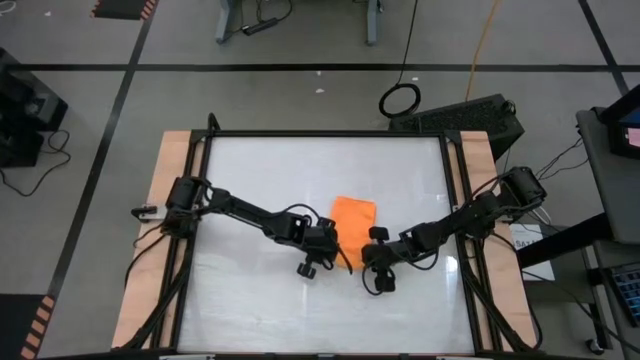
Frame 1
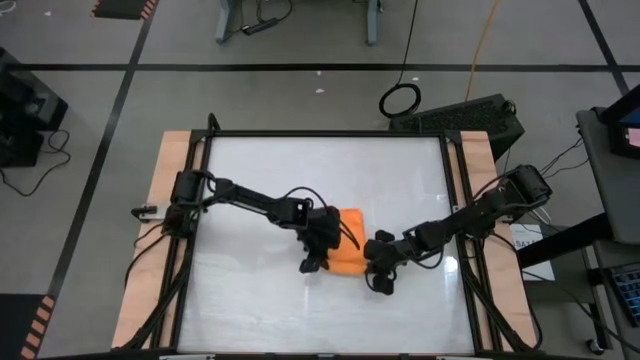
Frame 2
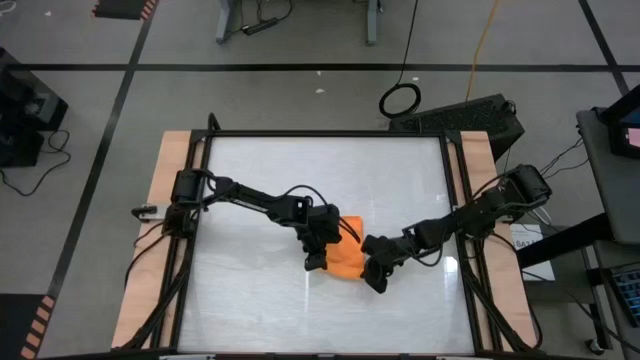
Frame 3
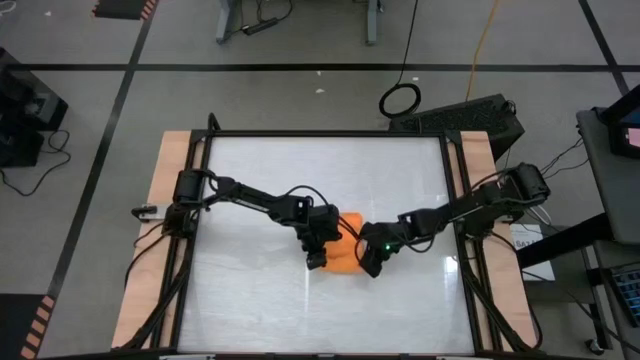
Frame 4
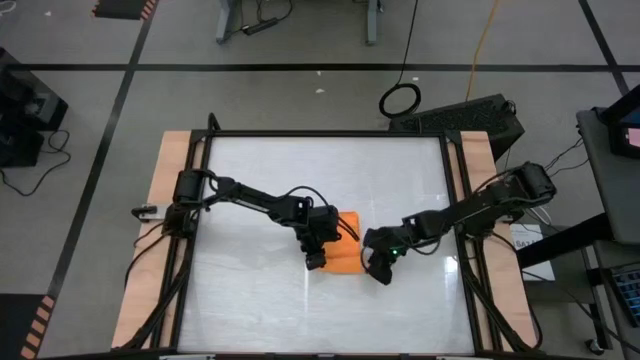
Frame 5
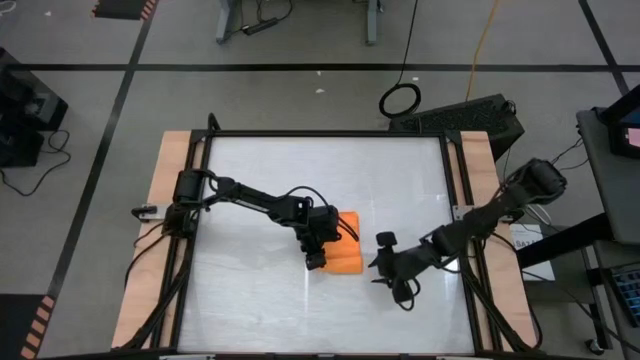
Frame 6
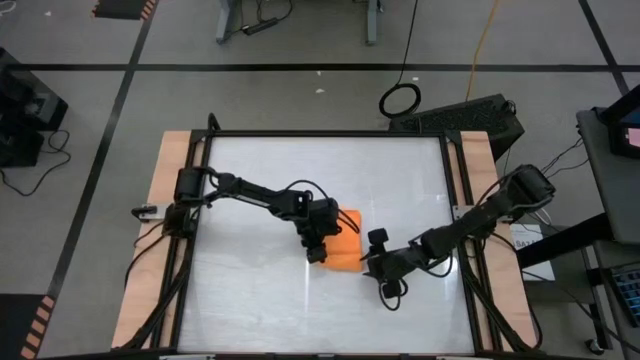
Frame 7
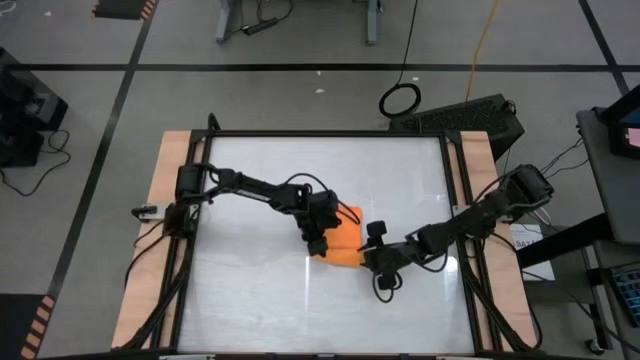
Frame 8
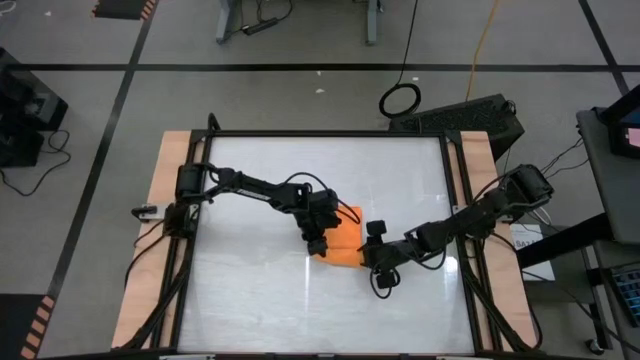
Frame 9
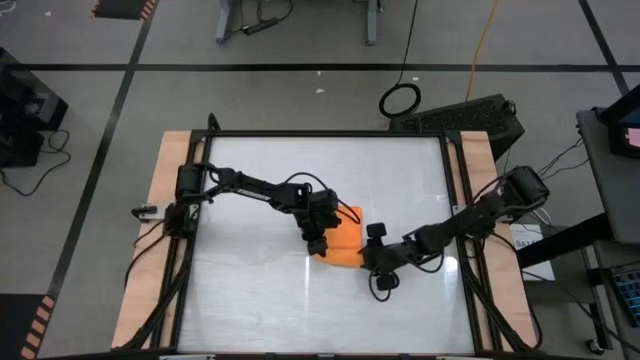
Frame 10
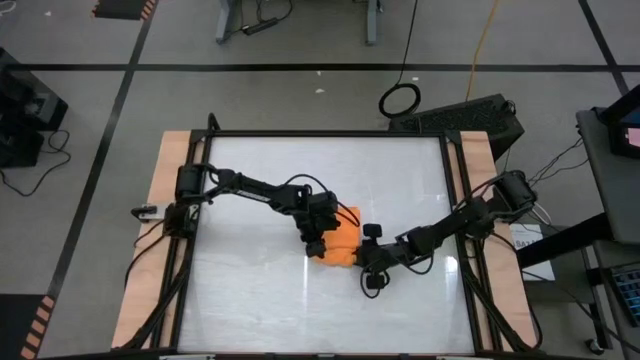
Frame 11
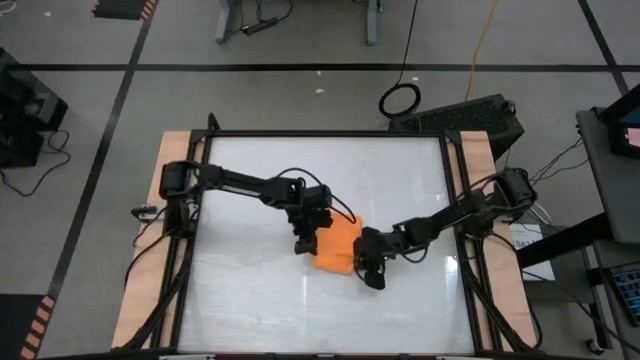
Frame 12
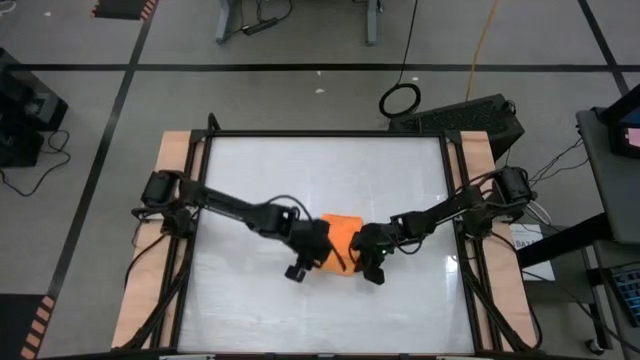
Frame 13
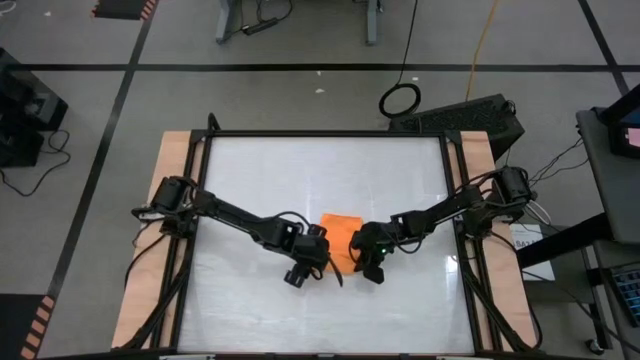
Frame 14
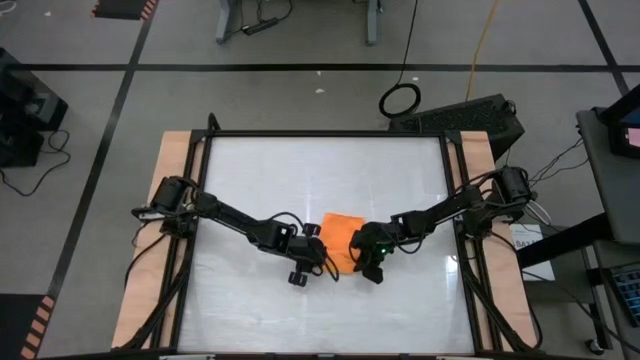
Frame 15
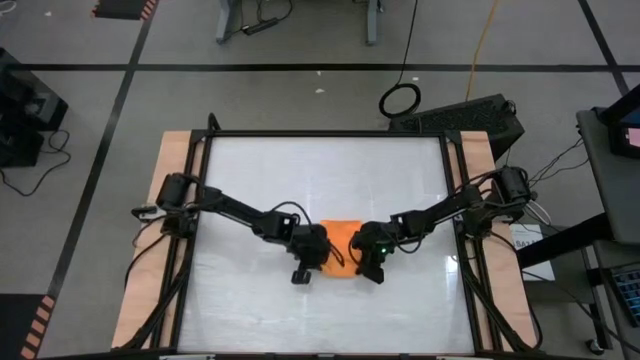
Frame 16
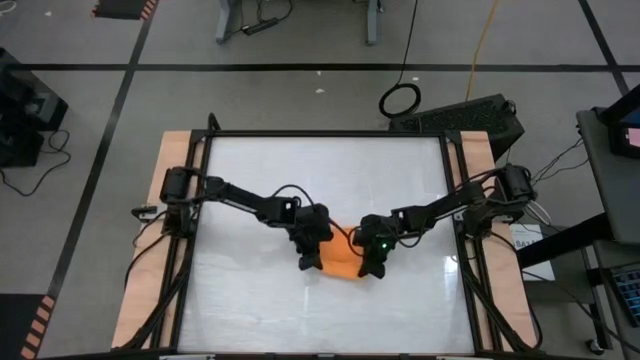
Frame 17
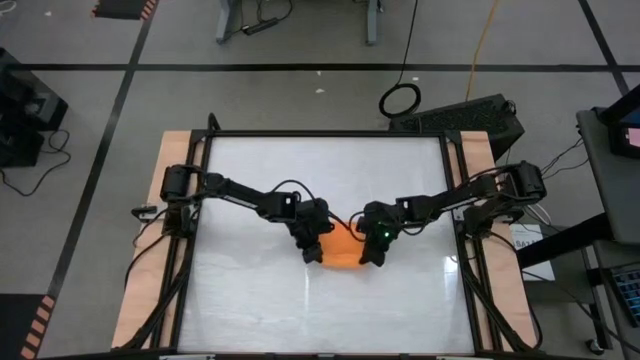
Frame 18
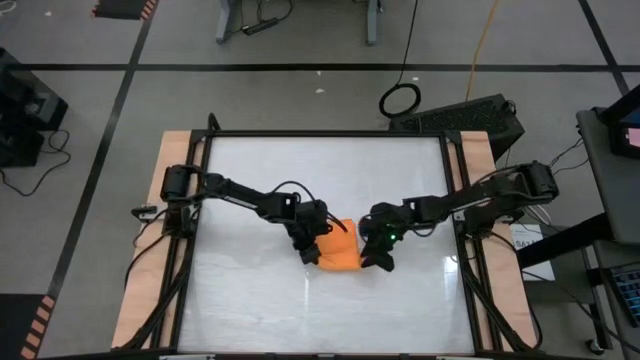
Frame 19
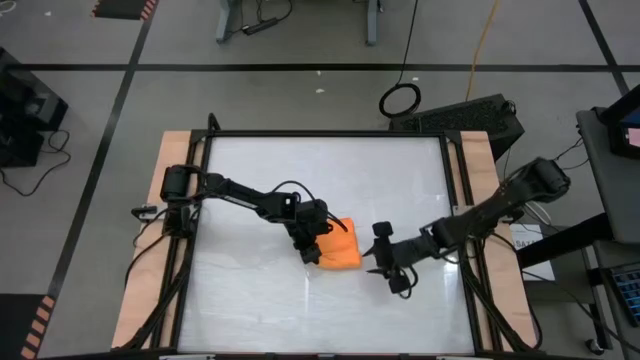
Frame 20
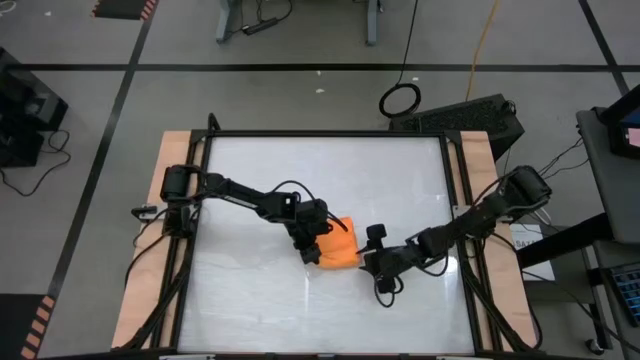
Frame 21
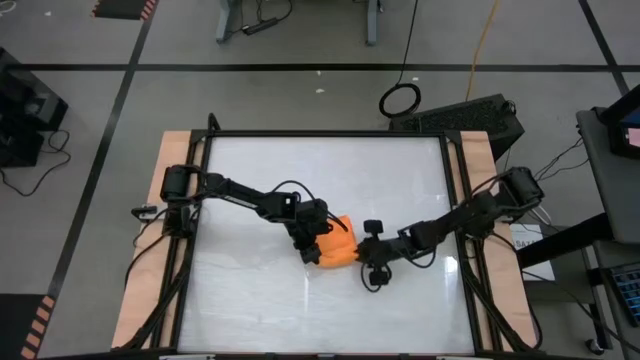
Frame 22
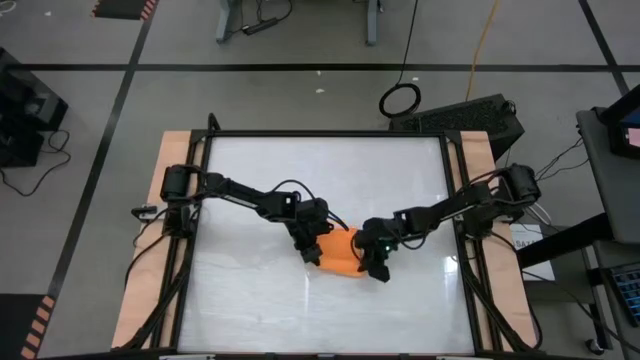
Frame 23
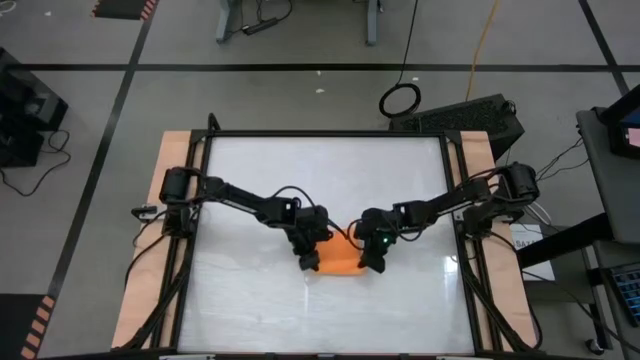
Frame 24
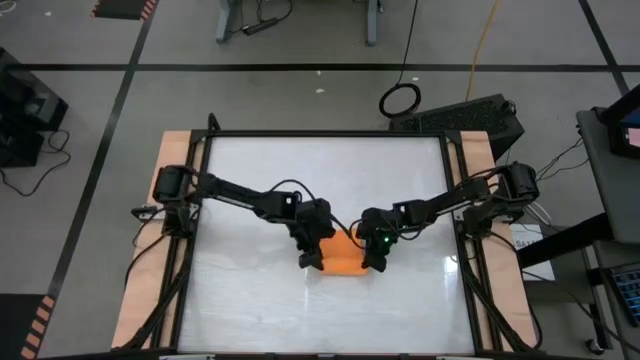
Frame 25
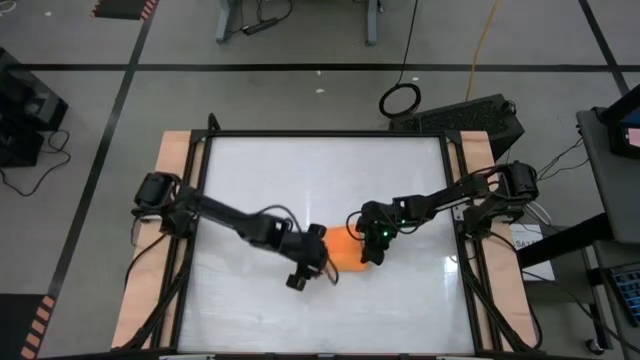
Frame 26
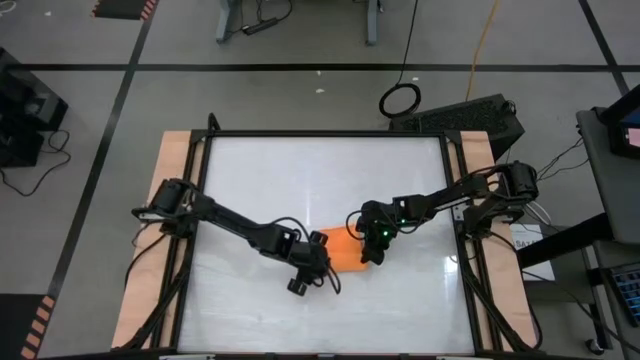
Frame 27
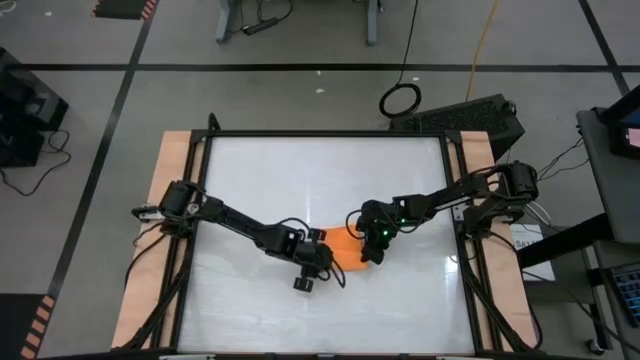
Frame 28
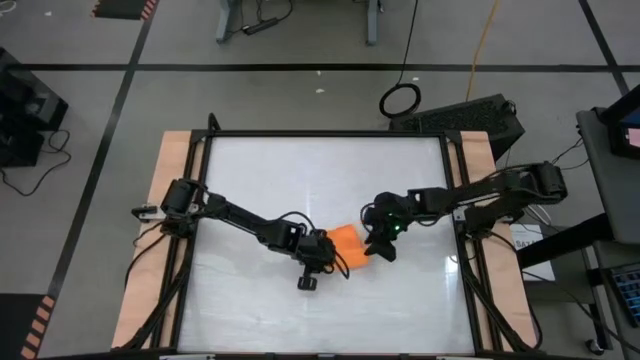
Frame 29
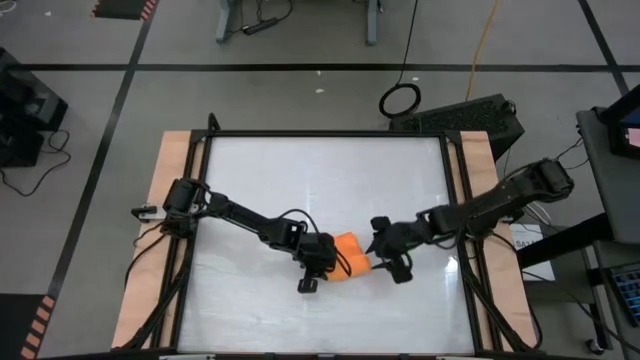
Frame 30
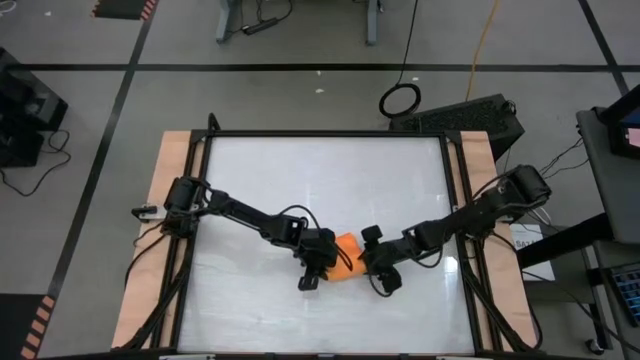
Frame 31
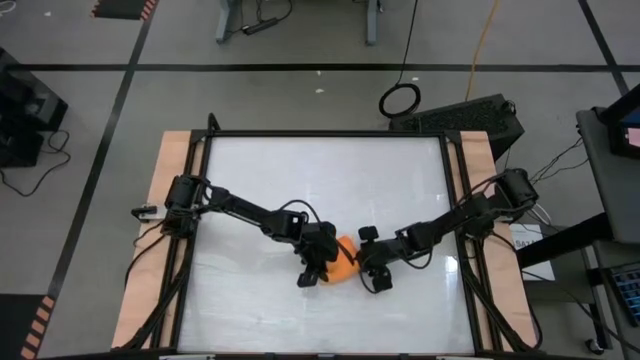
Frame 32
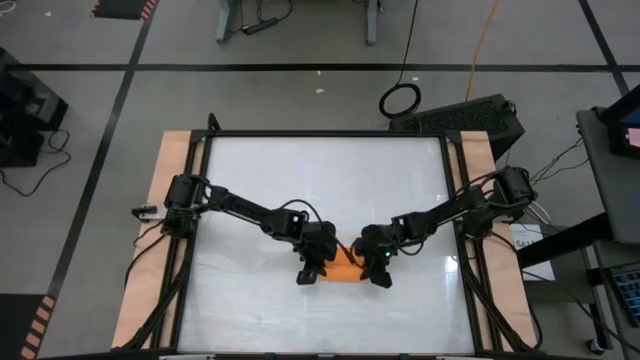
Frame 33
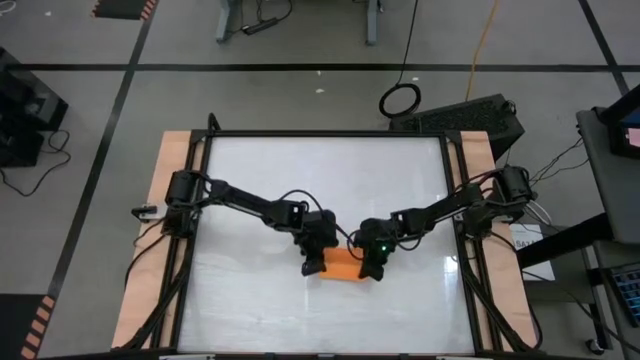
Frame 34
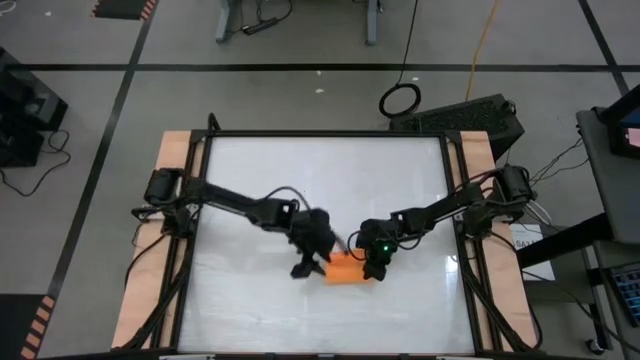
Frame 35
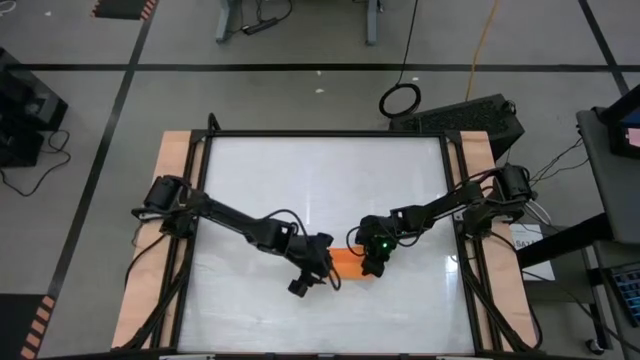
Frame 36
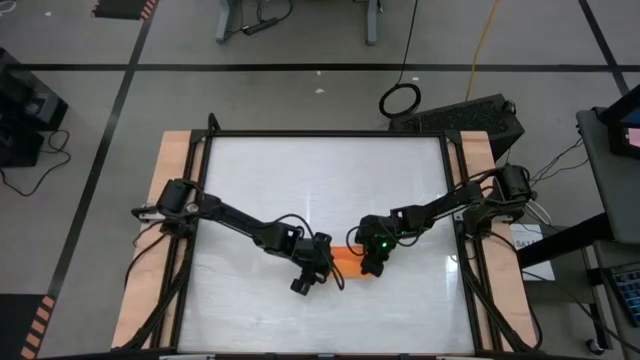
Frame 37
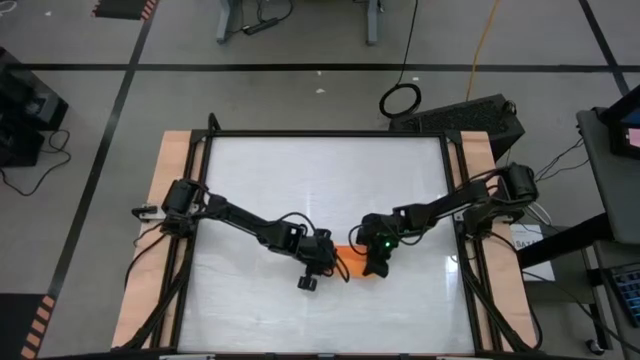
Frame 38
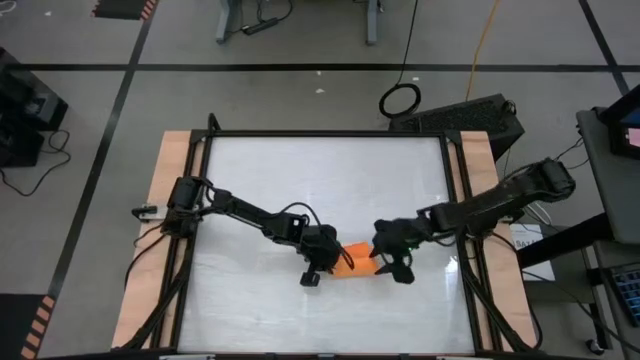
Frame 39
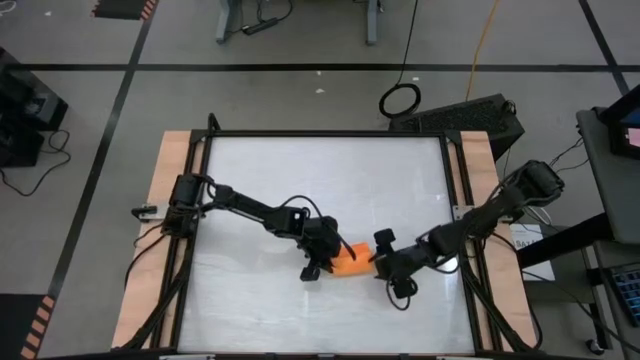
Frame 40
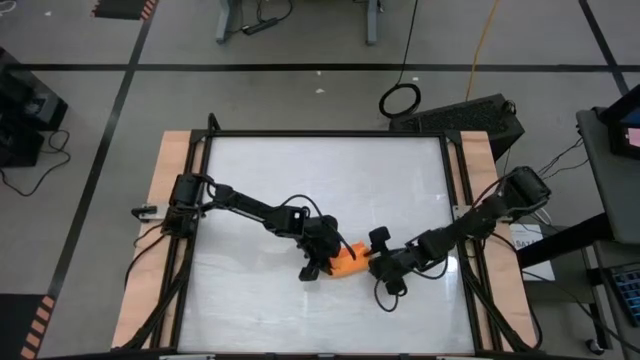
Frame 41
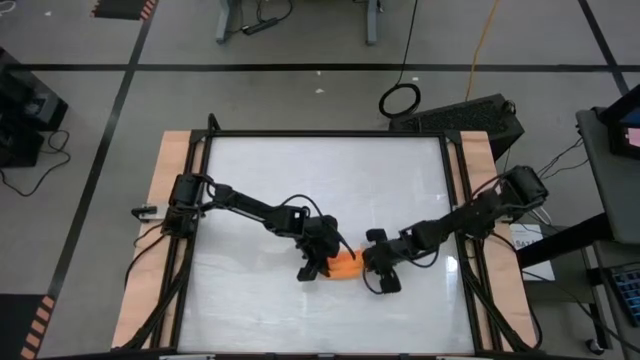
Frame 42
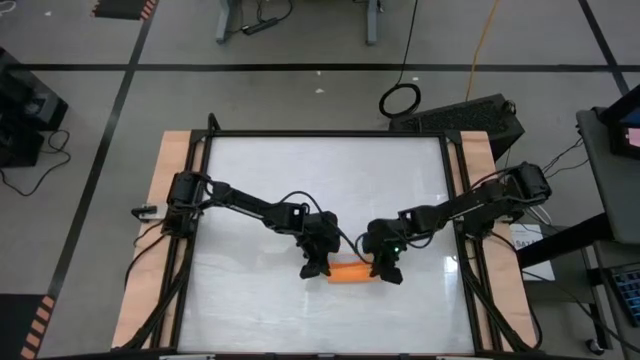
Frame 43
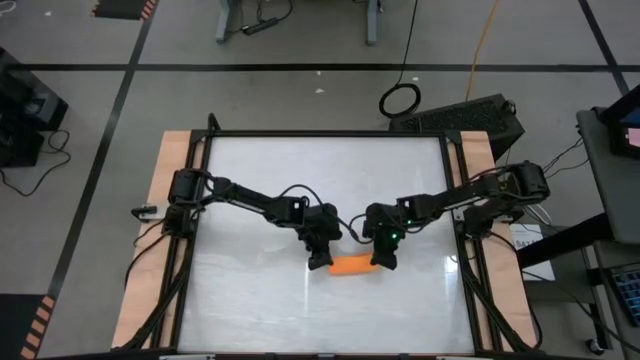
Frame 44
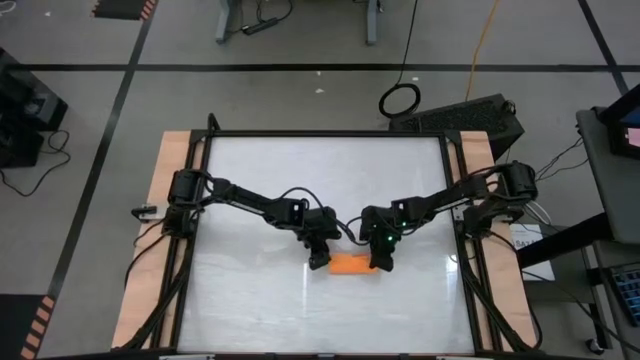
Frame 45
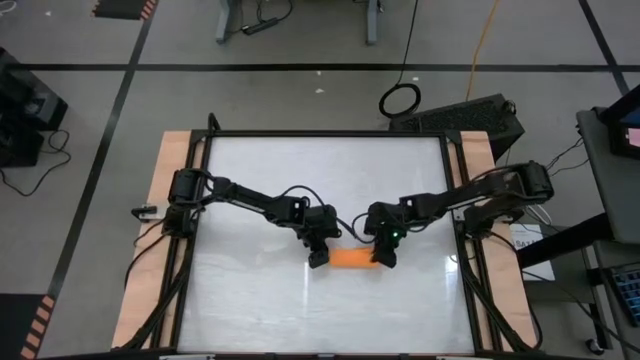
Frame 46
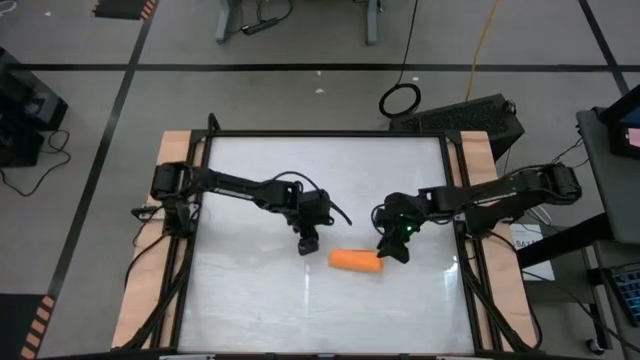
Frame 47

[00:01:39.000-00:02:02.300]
Task: Roll towel
Roll the towel
